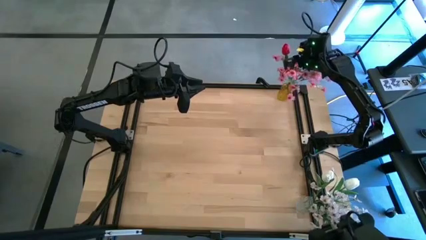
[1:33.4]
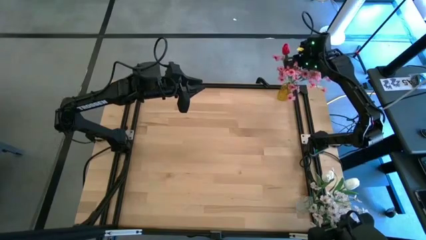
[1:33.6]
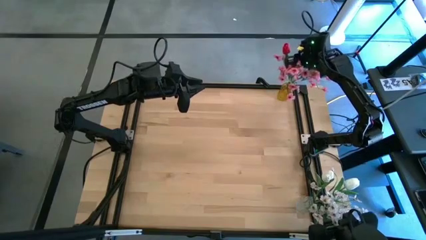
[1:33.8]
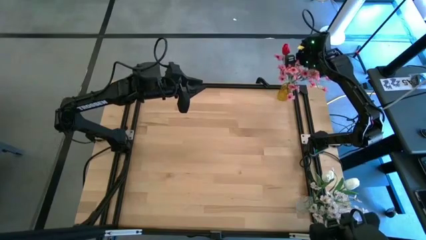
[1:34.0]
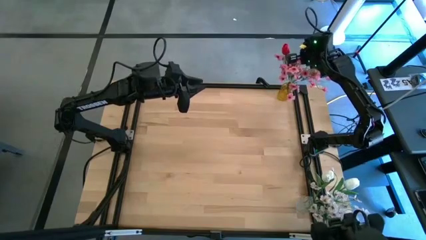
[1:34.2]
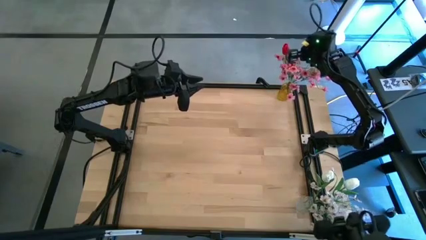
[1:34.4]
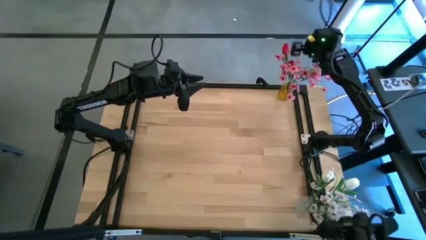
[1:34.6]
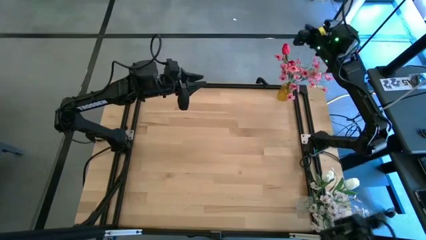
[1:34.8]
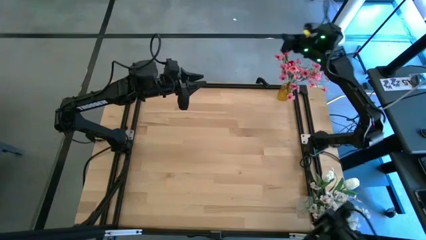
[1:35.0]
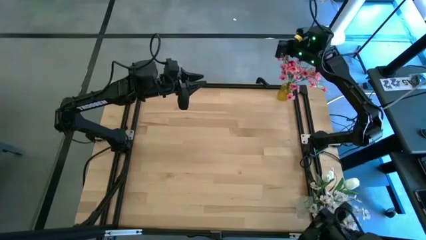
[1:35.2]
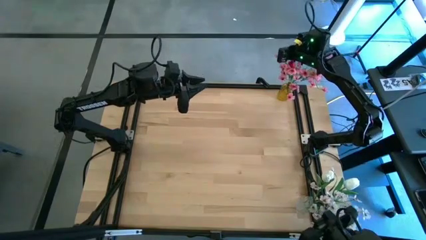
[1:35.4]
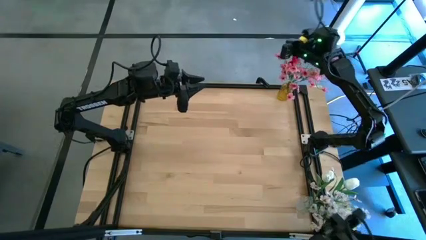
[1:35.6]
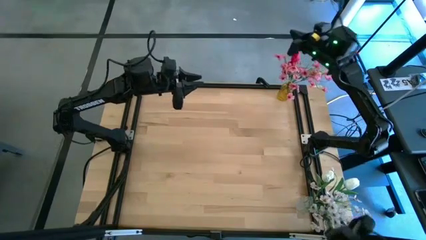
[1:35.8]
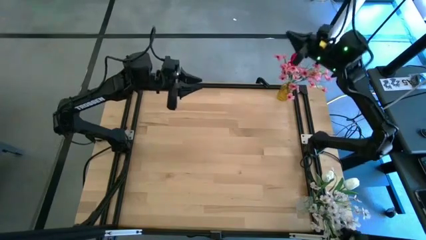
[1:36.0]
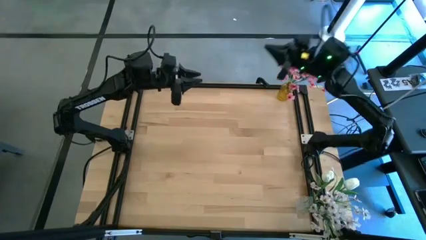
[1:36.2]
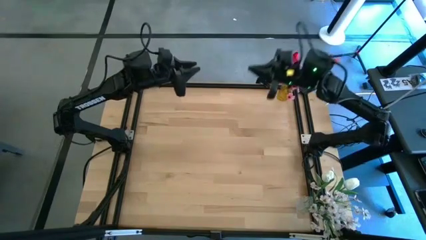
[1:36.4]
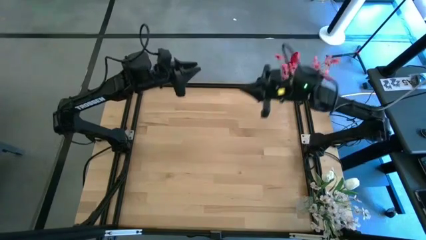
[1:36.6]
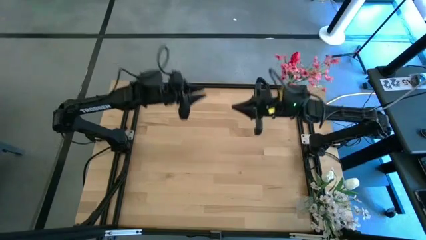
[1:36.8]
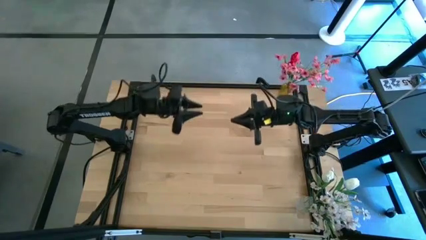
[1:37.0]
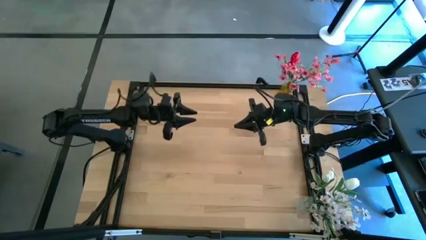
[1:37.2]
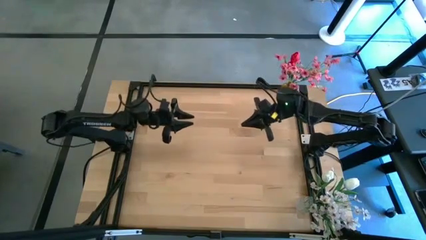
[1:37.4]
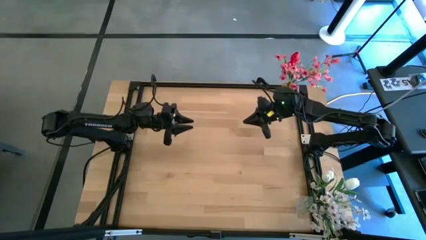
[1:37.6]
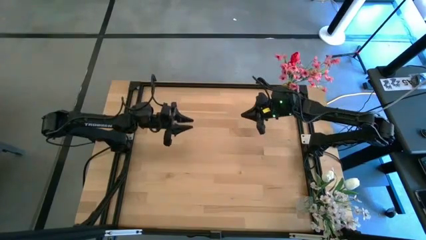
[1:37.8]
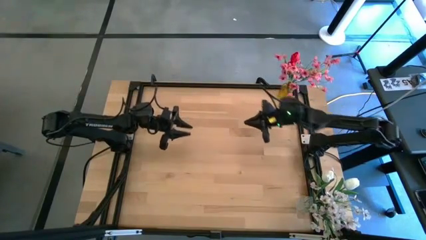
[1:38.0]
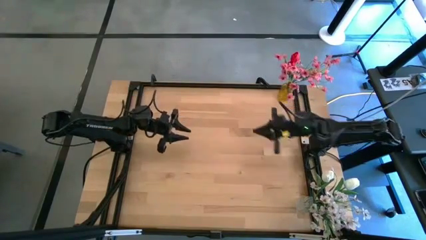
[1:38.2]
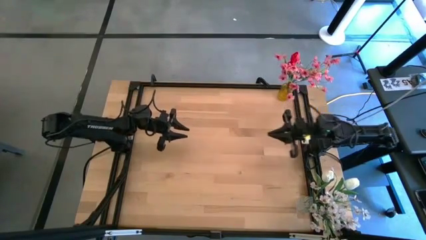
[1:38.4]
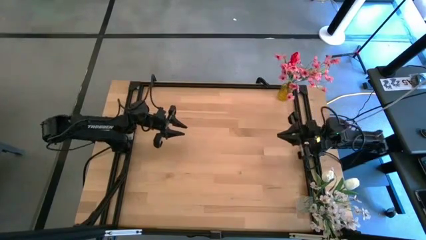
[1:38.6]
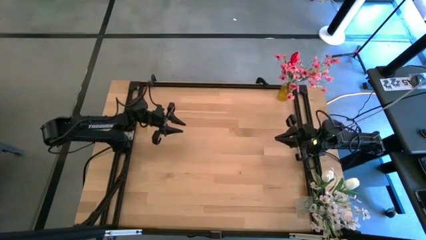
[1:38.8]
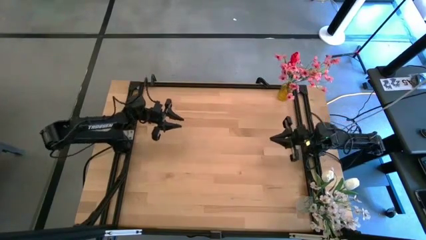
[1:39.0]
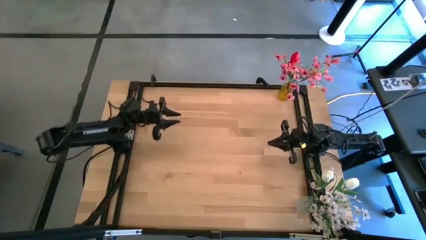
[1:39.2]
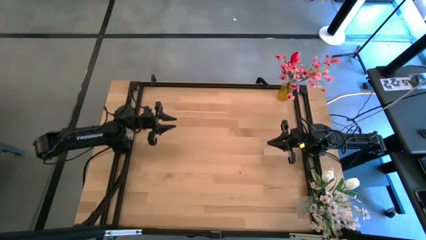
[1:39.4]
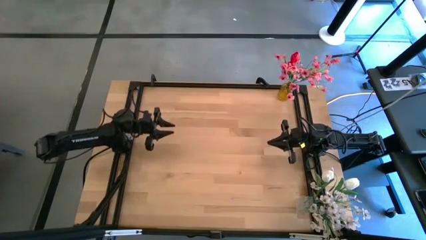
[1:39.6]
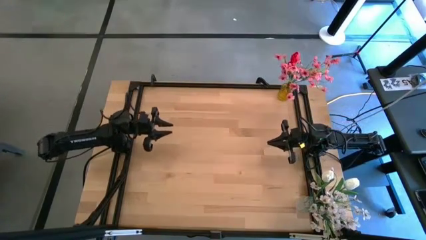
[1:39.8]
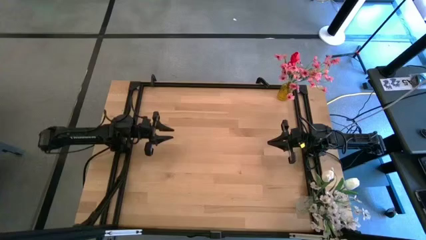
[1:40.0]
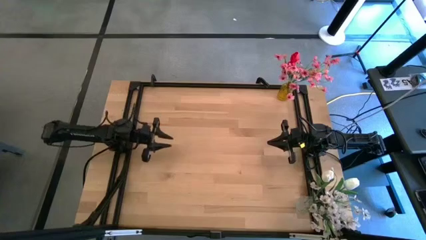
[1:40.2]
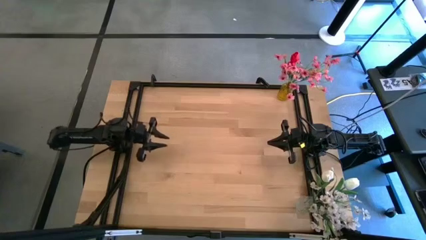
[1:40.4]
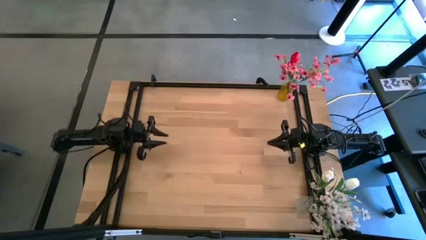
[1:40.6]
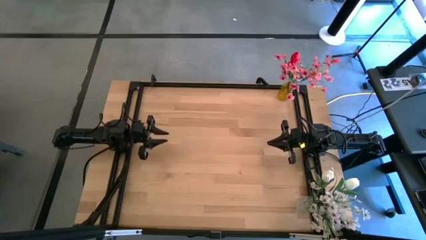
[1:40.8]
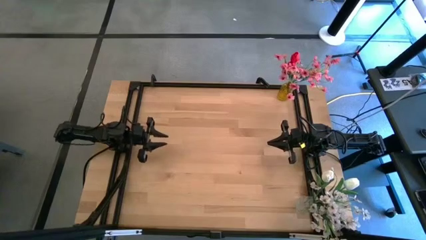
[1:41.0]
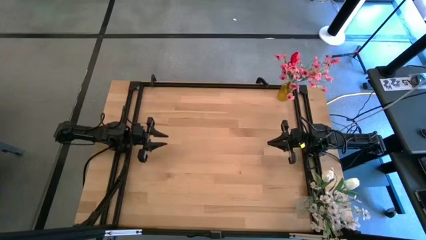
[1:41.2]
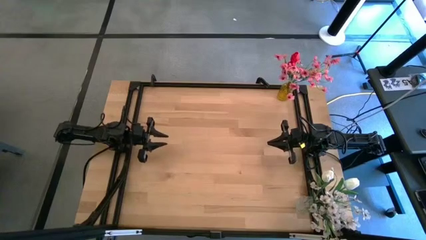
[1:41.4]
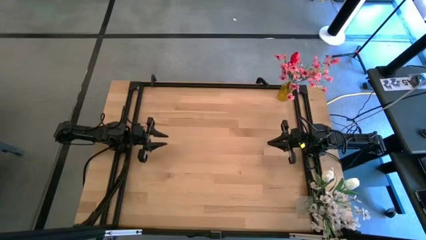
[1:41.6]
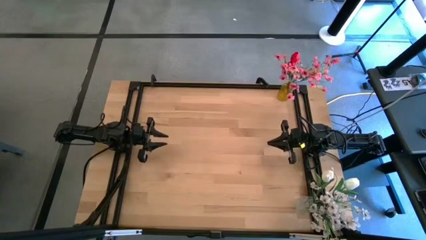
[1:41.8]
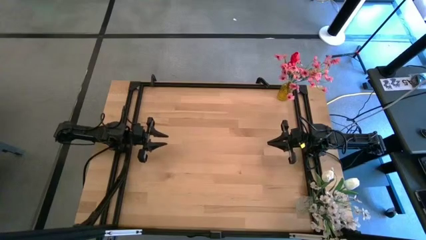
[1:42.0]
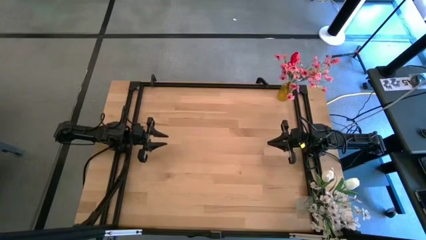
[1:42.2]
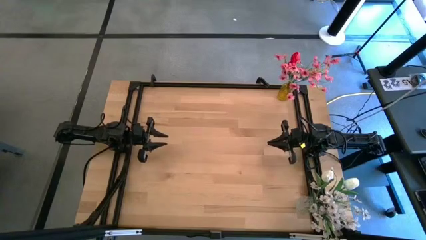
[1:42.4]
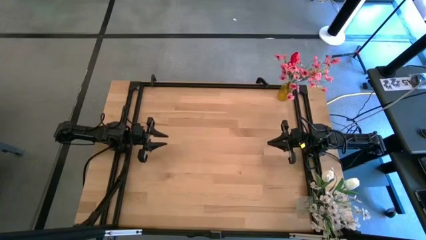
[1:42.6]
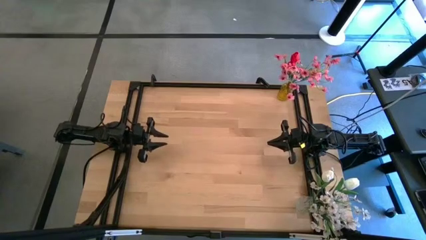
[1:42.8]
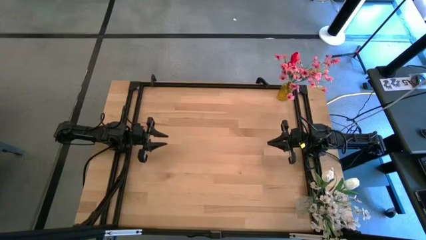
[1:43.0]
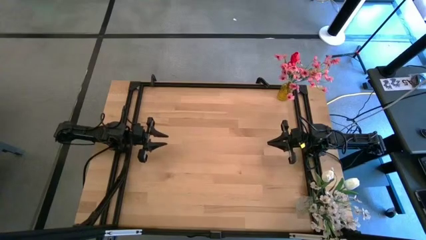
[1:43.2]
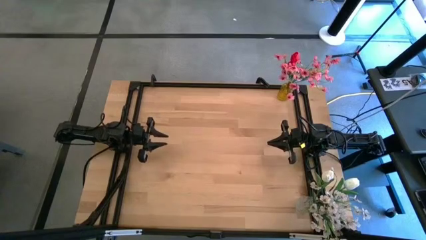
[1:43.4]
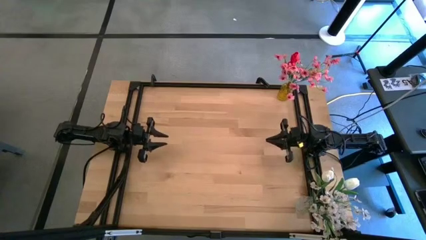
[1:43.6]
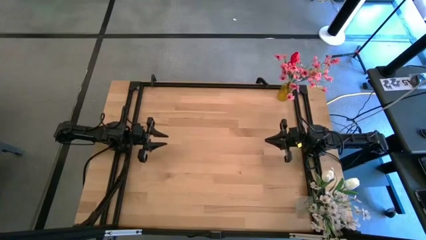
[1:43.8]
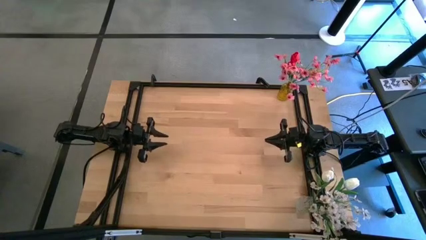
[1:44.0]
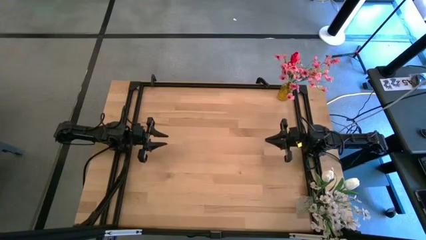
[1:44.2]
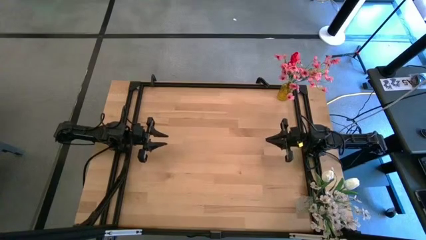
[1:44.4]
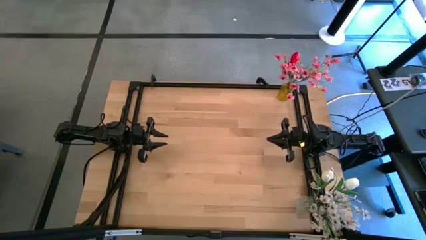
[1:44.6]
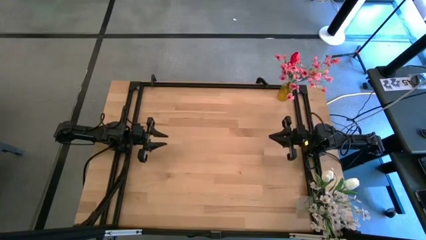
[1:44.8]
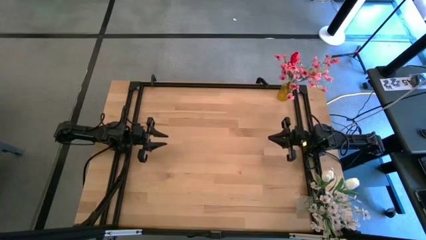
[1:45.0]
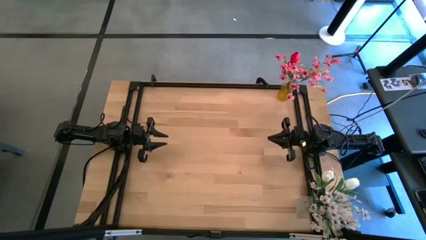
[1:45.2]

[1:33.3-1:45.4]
Task: Sort flowers into vase by color
Return to Home Position

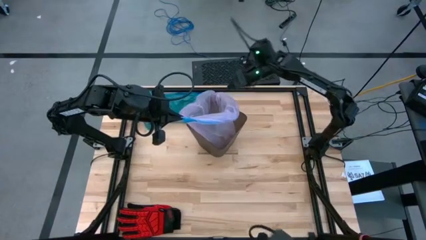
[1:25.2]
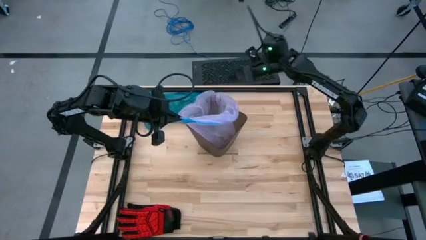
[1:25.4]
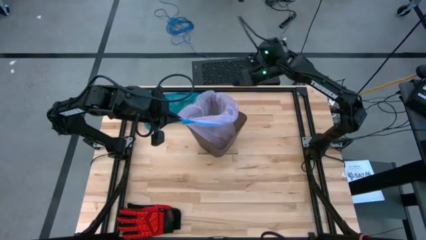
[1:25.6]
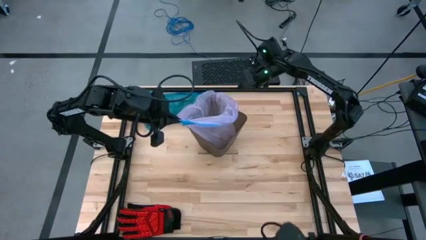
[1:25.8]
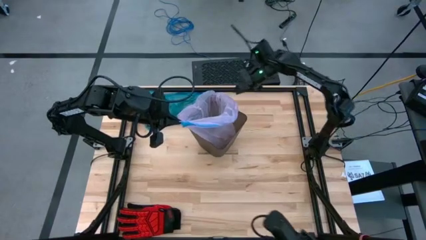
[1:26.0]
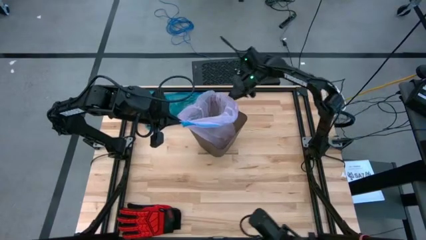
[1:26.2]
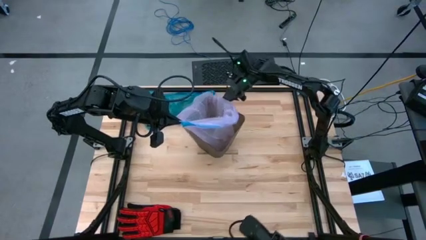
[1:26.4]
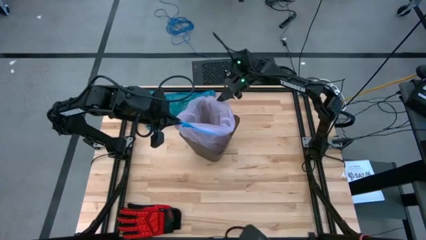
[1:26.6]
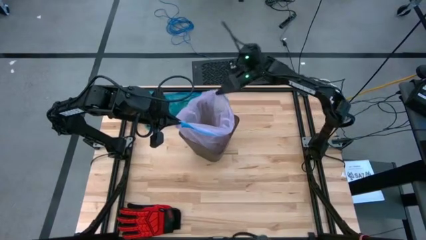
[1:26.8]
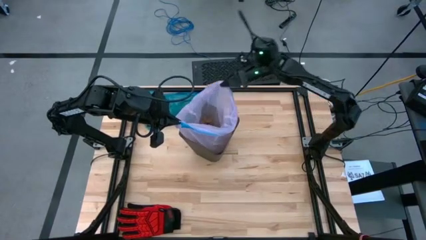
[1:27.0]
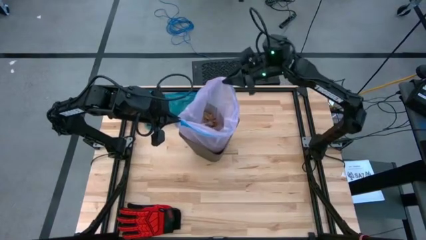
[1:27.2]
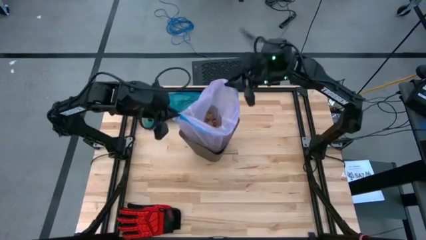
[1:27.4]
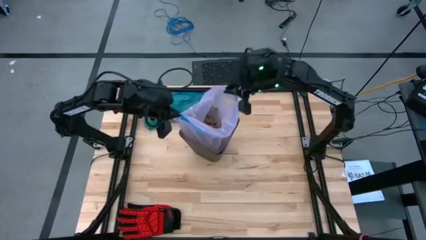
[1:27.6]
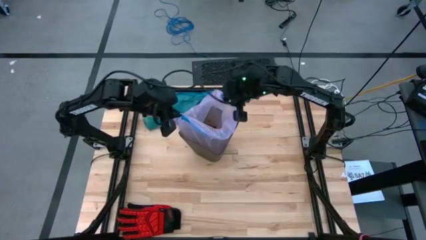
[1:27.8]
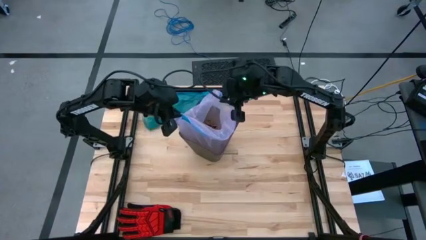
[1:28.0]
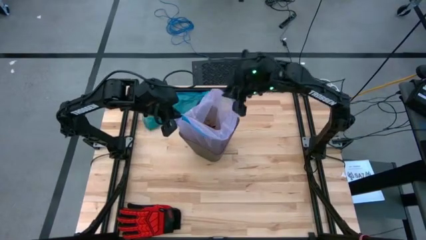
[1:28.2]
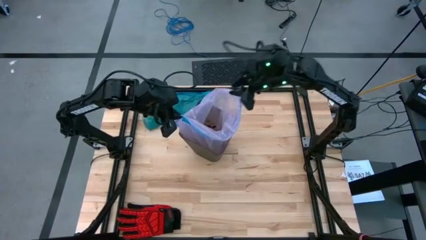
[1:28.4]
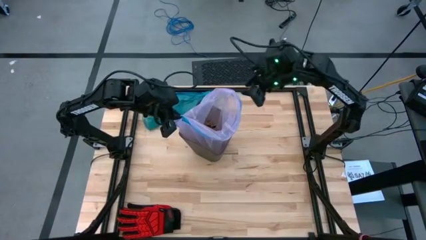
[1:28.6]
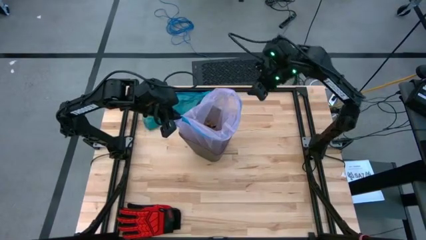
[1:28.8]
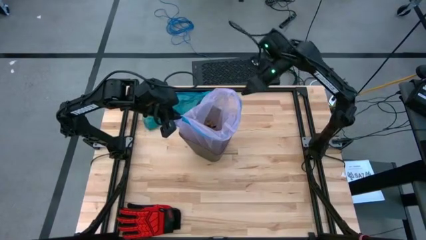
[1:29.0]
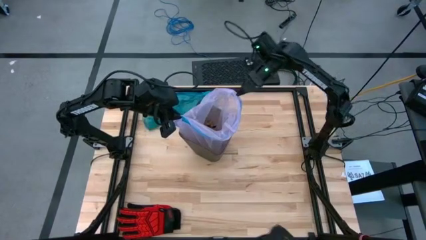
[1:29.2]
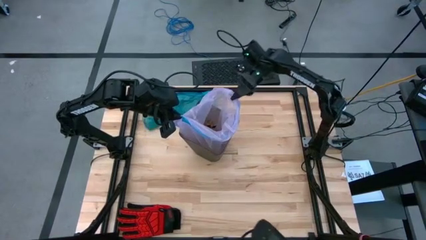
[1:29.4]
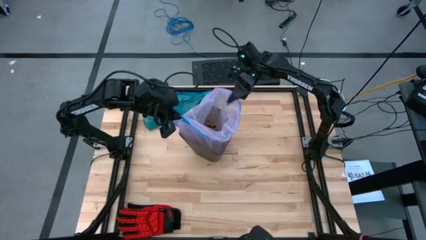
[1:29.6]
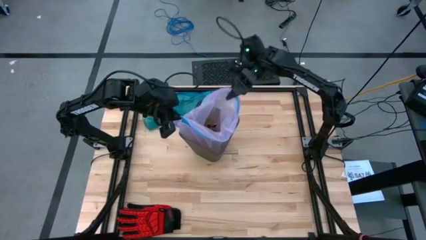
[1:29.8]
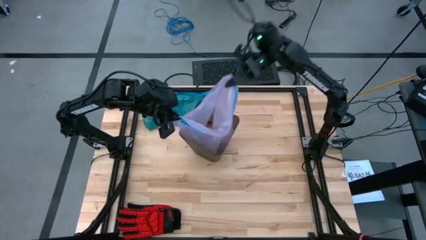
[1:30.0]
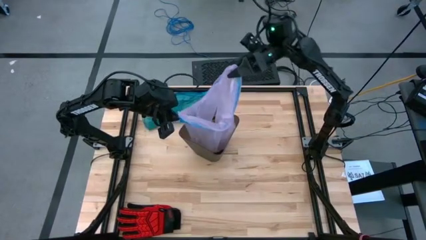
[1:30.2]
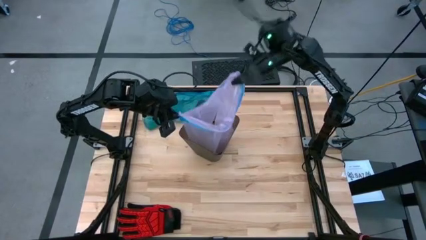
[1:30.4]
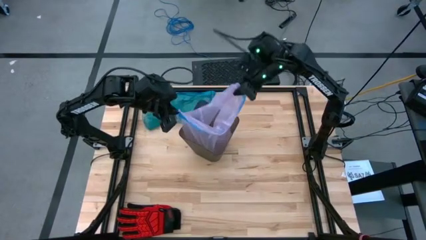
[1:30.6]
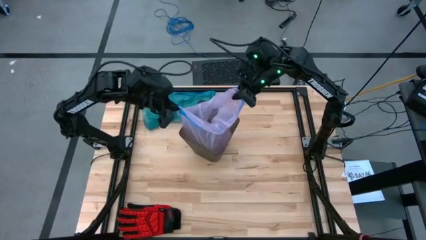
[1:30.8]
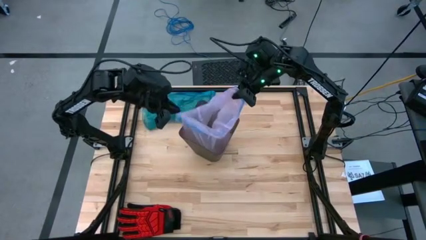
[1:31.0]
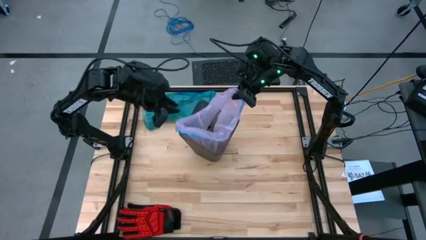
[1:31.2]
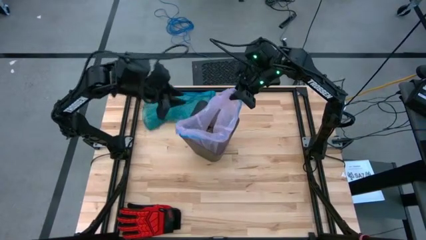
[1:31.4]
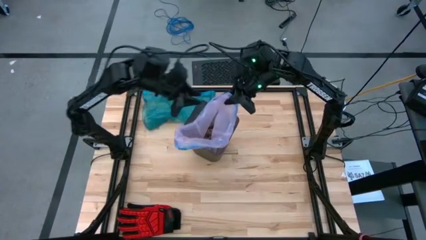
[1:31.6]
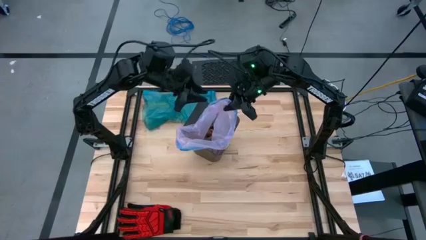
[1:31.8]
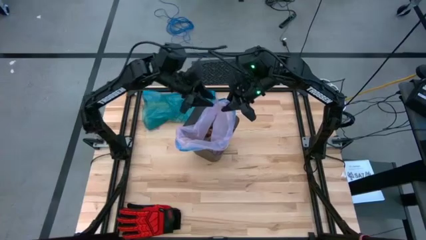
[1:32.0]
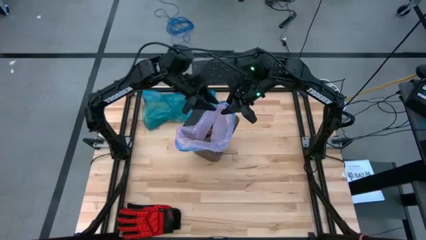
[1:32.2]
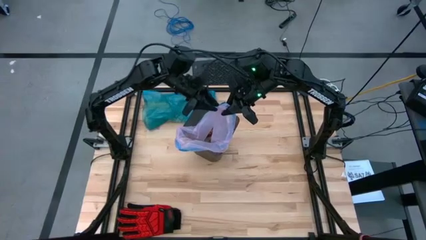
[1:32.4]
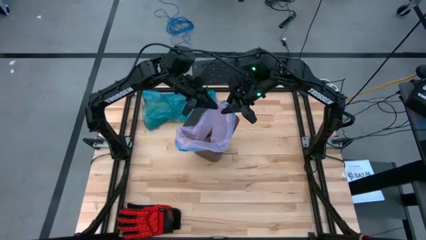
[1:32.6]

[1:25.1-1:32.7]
Task: place trash/remove bag and relplace
Remove the pink trash bag from the black trash bin
